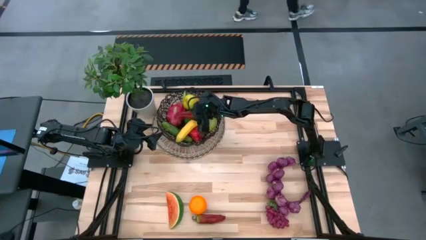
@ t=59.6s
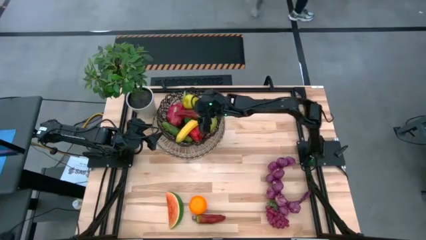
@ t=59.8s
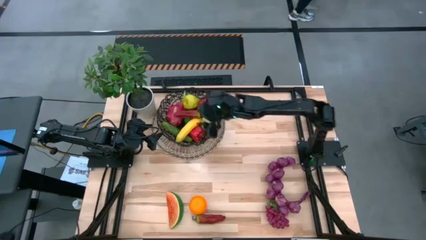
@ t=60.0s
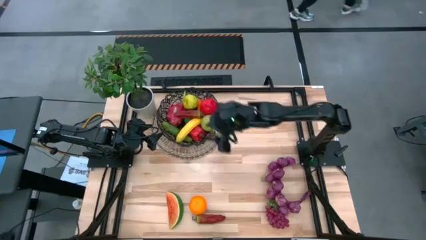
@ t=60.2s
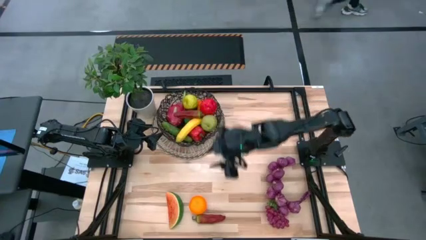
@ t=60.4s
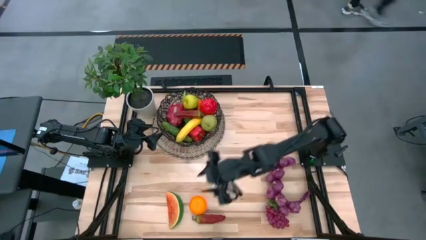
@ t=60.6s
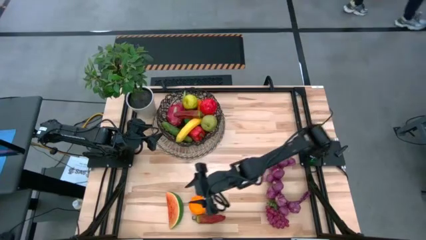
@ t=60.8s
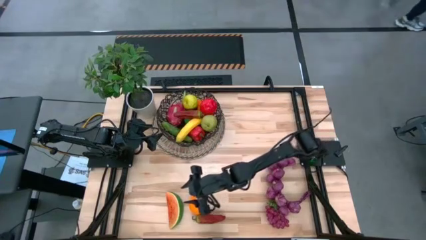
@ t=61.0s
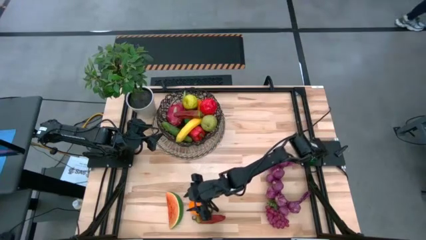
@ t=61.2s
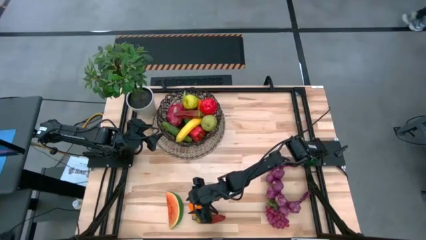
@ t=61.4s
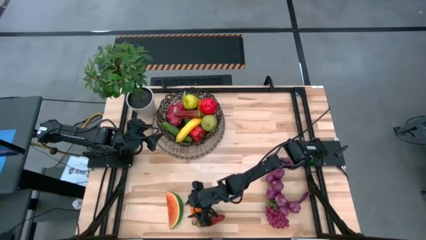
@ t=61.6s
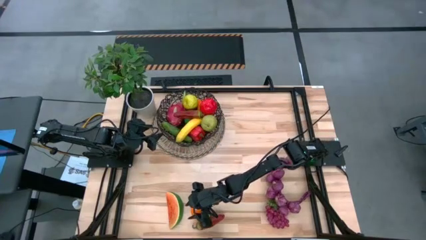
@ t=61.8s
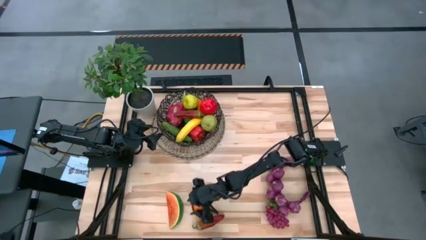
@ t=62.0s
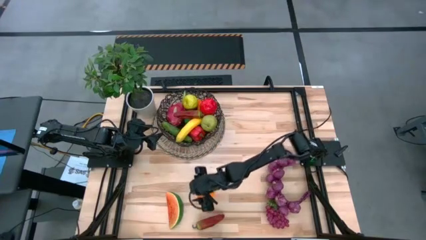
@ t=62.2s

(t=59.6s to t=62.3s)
Task: Build produce basket
Put the orange into the wire basket

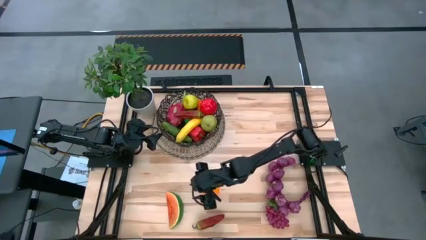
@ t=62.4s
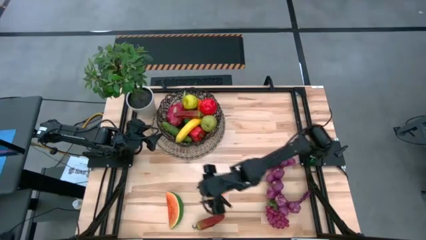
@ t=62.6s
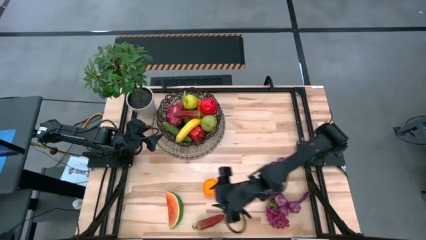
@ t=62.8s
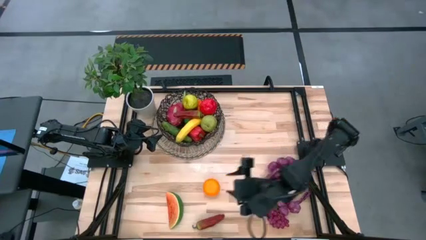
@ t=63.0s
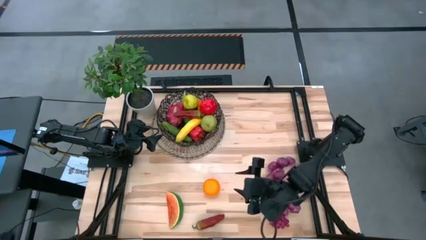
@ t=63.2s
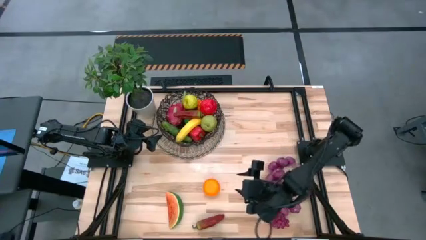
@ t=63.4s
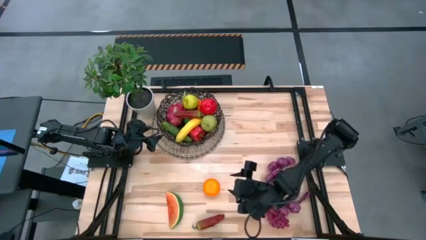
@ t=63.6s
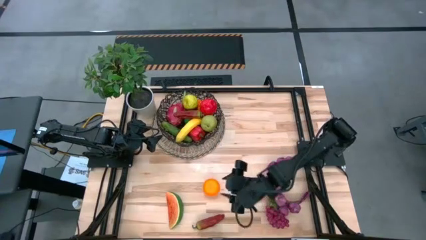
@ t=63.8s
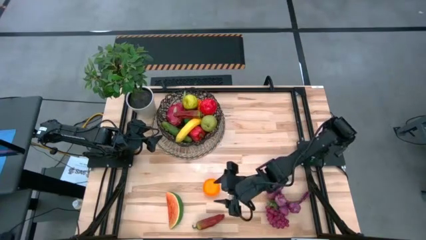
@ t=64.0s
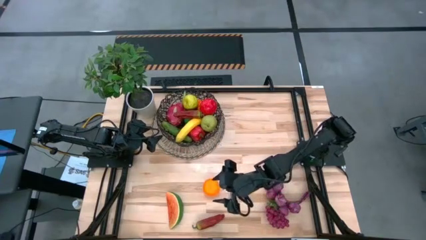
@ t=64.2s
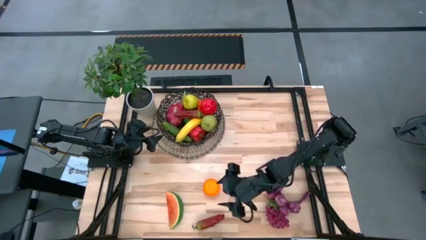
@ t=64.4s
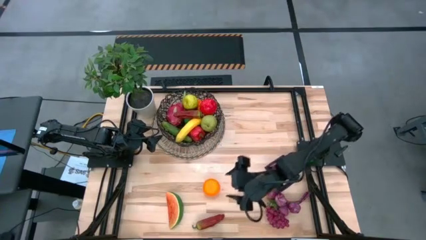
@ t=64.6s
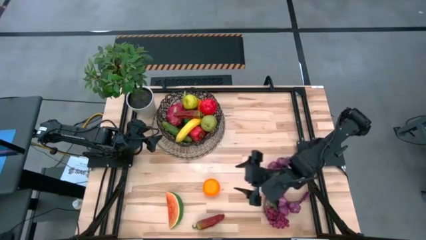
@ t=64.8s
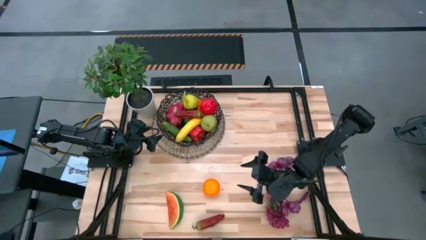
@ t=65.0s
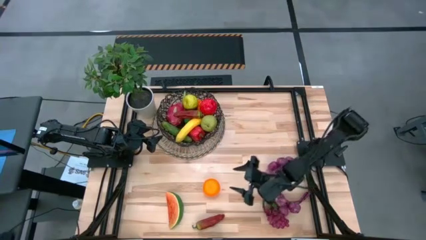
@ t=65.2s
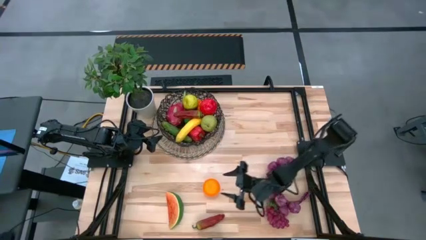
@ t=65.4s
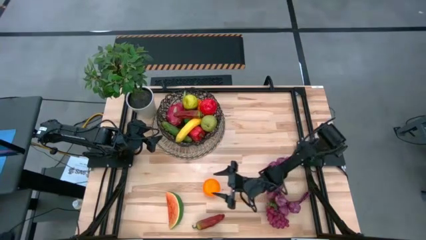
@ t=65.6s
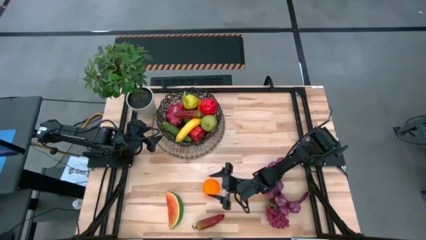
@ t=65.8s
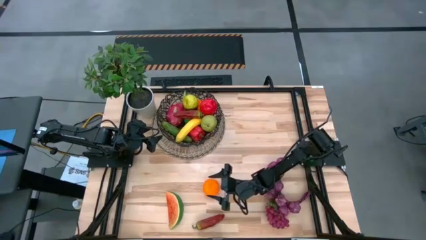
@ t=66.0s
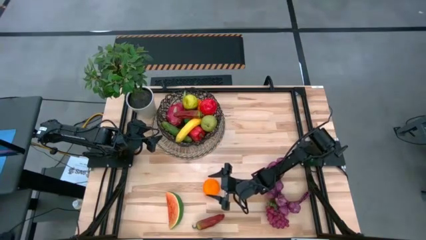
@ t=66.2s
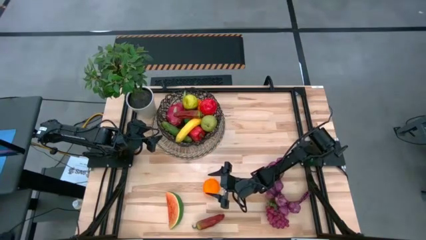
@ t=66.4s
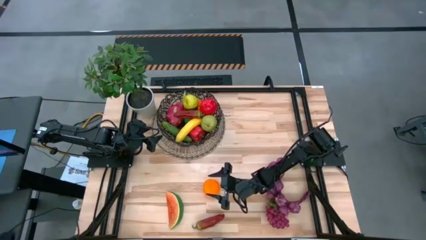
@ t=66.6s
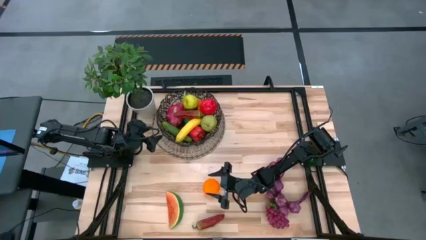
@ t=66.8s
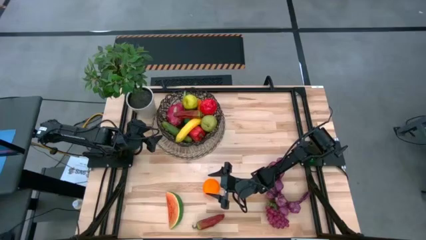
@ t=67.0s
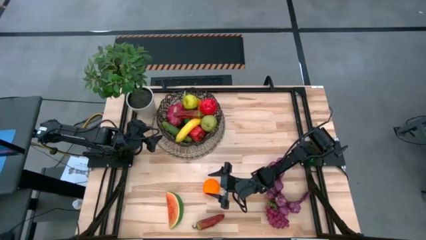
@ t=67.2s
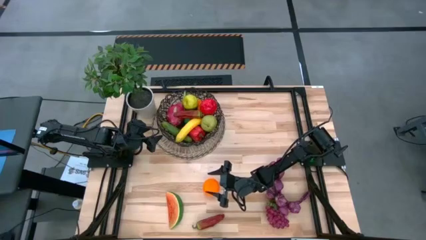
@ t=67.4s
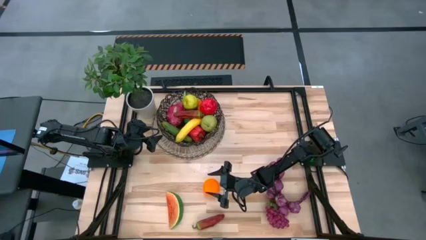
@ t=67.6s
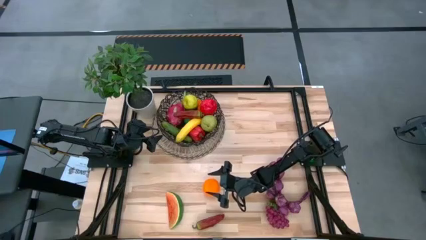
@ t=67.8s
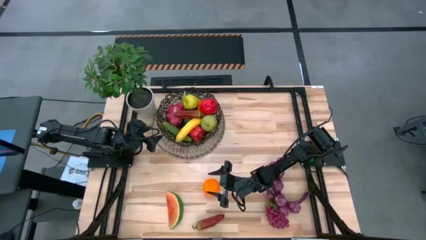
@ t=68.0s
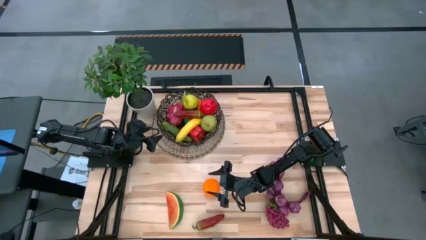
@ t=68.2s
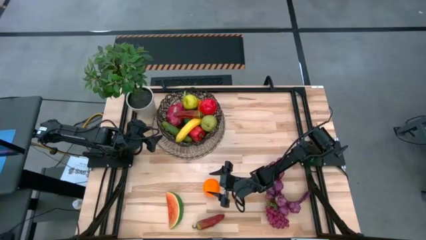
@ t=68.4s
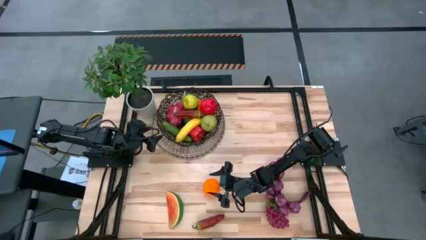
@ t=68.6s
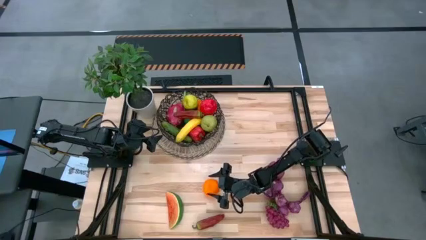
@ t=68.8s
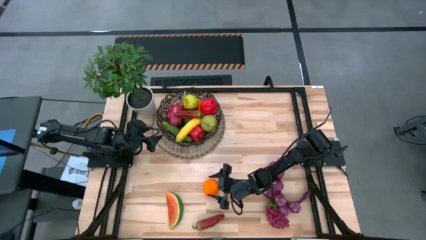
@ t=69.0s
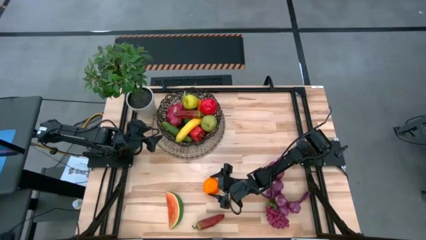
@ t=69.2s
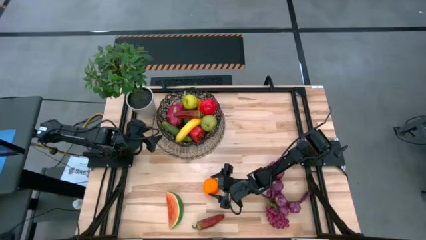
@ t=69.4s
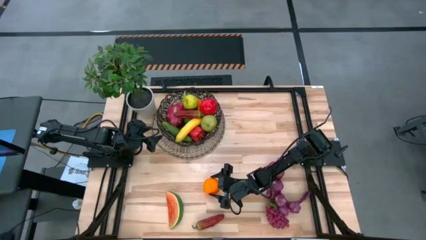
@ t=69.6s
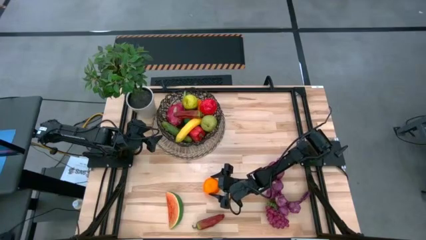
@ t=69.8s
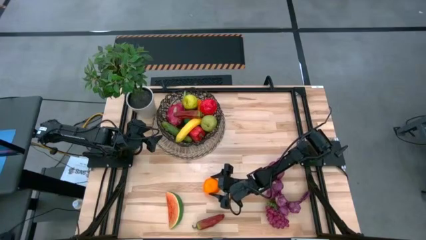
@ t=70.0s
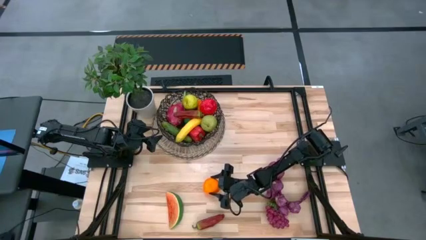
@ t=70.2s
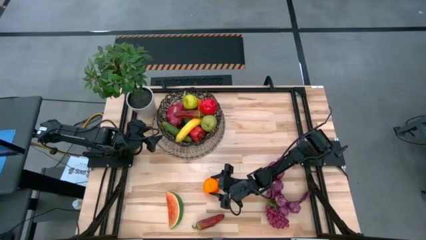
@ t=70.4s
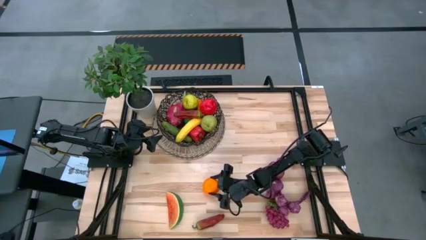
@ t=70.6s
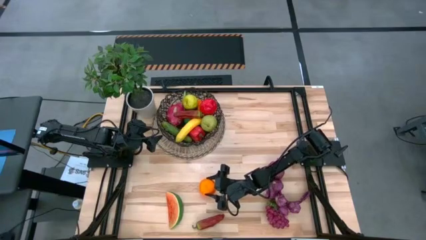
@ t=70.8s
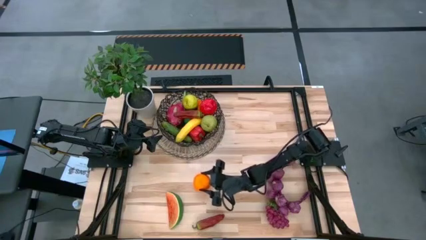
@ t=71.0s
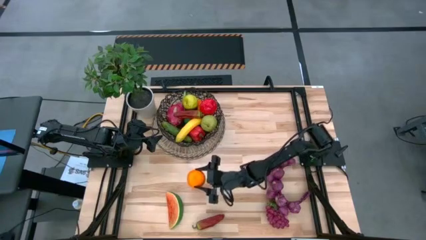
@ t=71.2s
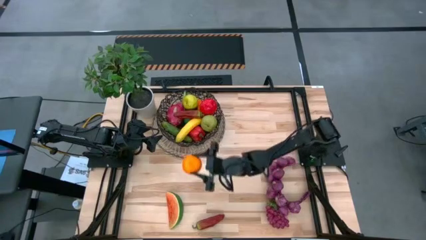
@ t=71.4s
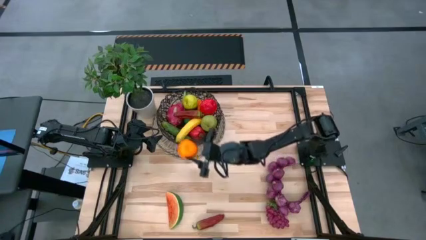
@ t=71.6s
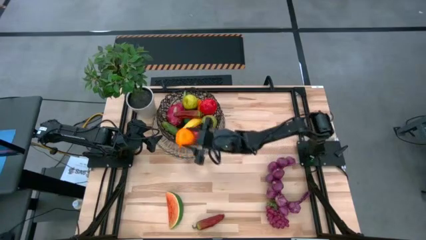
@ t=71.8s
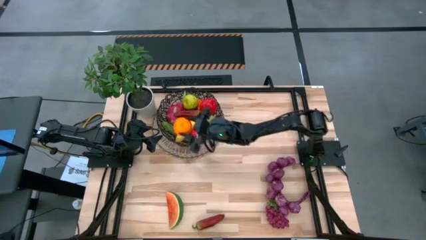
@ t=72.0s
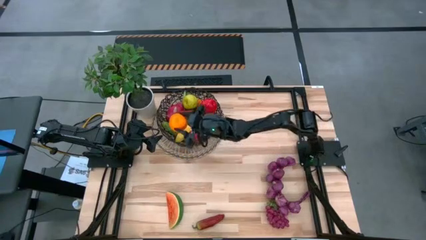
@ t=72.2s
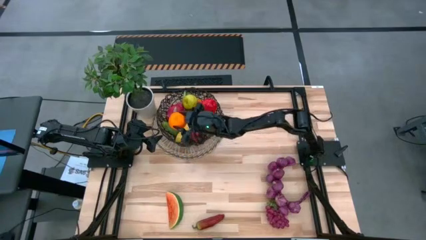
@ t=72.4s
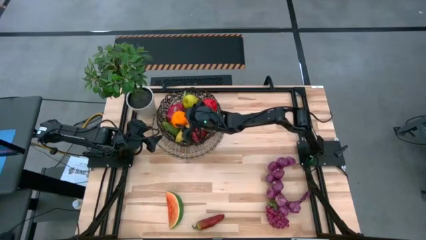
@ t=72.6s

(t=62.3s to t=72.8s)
Put the orange into the wire basket

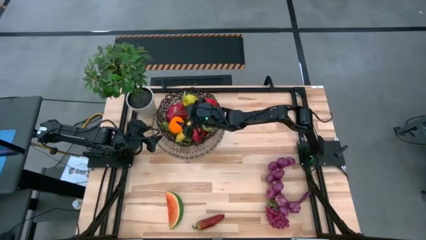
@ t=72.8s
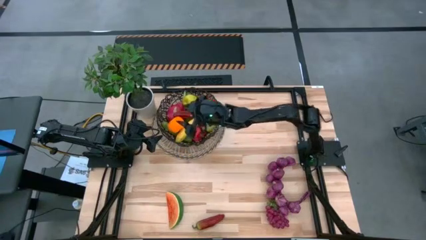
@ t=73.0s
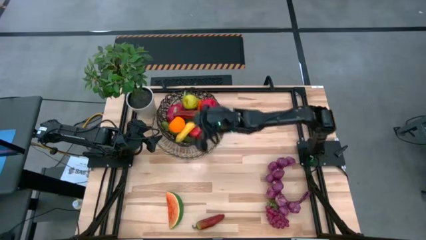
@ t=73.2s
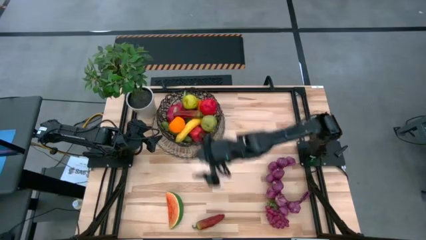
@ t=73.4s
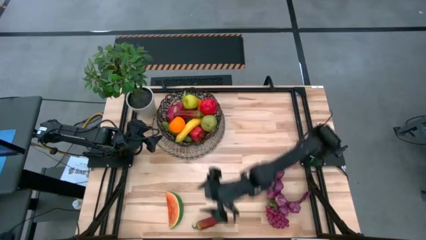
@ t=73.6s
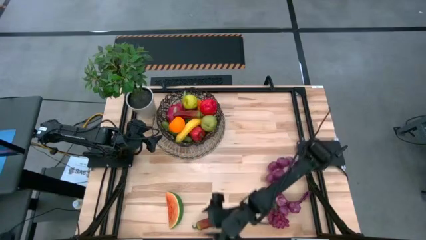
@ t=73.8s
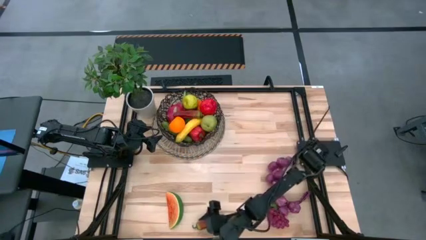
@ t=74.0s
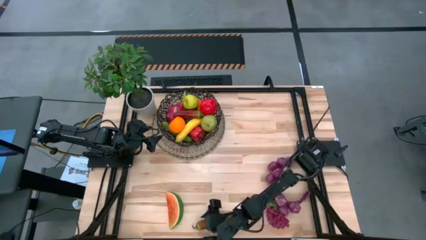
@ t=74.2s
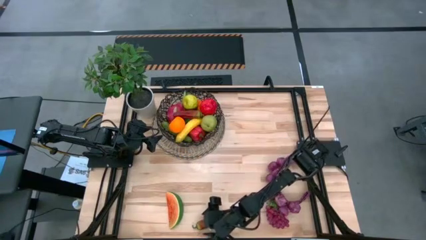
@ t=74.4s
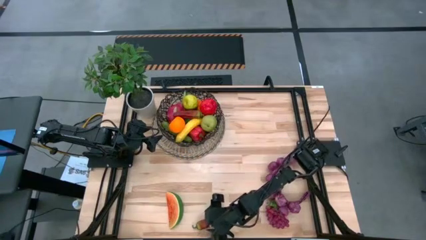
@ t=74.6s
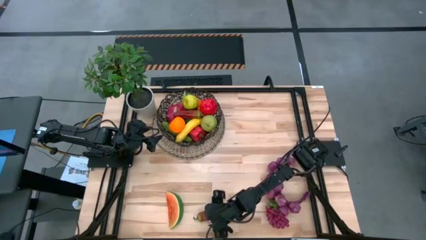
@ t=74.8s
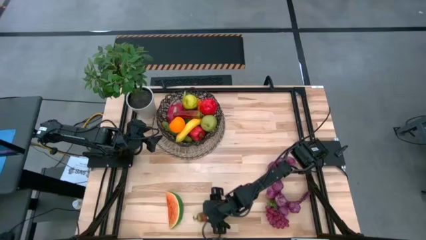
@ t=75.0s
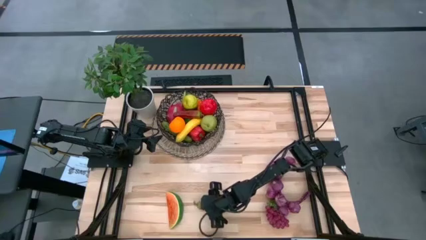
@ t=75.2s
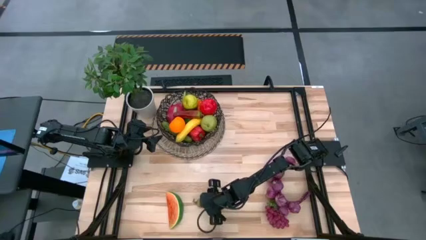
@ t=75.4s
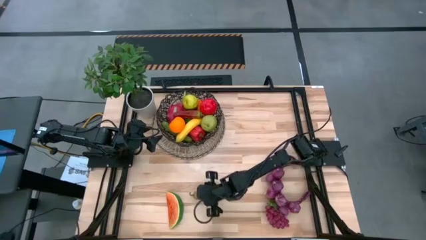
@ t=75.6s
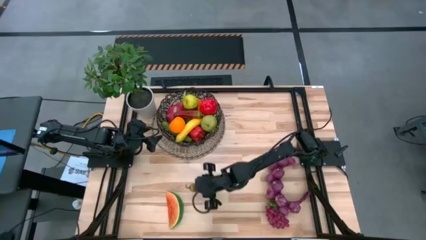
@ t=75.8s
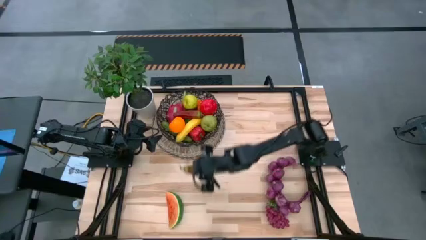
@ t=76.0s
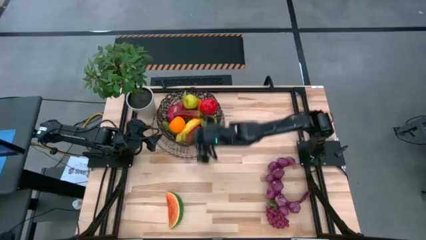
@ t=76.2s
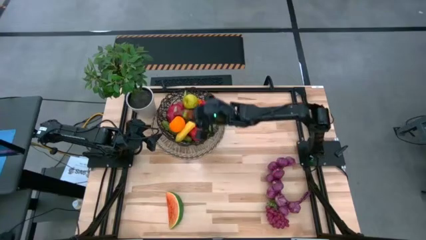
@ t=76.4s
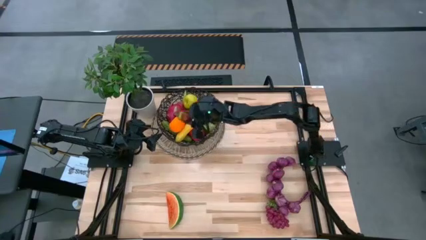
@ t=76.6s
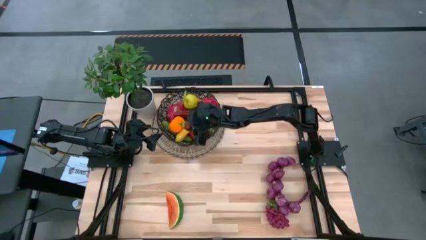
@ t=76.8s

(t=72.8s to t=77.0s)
Put the red chili pepper into the wire basket
